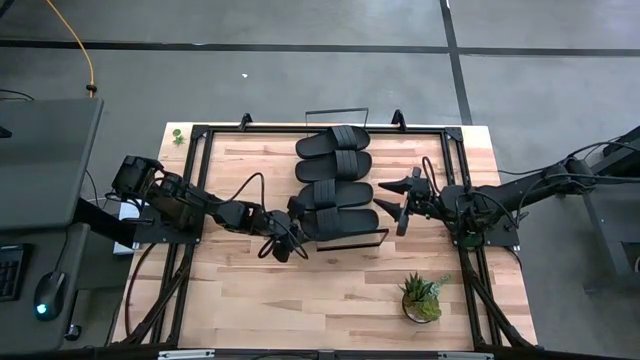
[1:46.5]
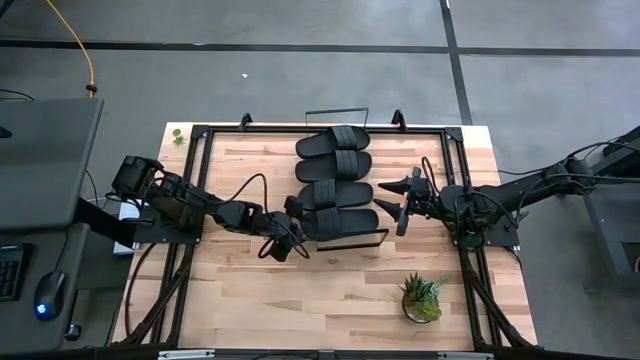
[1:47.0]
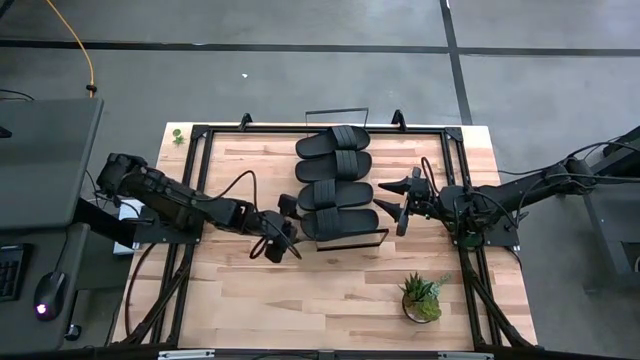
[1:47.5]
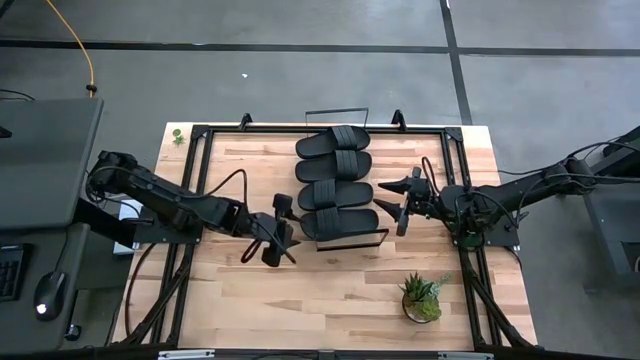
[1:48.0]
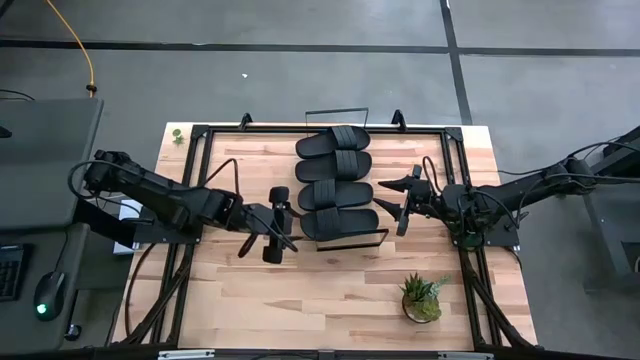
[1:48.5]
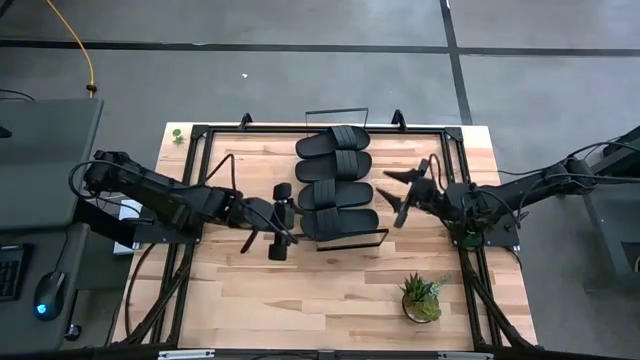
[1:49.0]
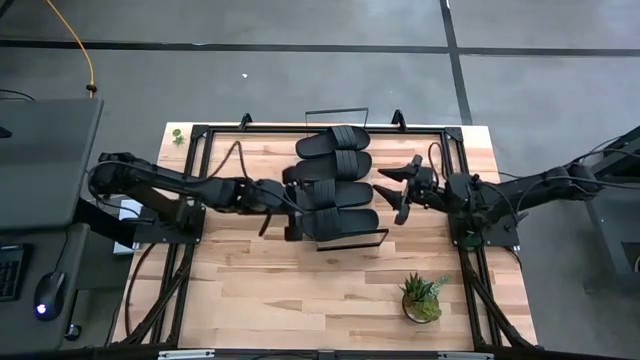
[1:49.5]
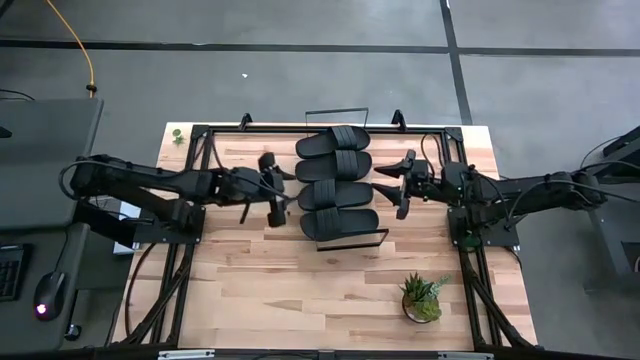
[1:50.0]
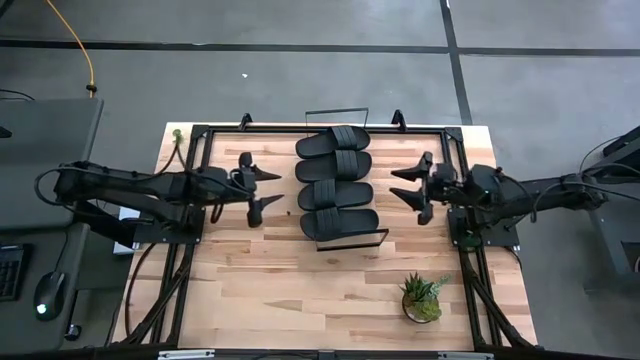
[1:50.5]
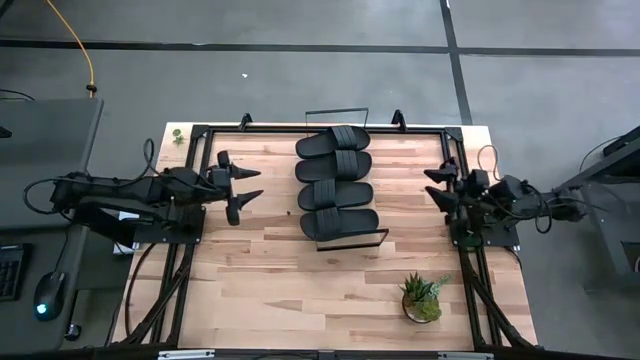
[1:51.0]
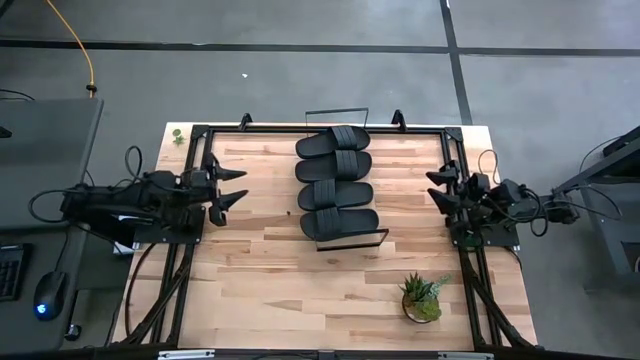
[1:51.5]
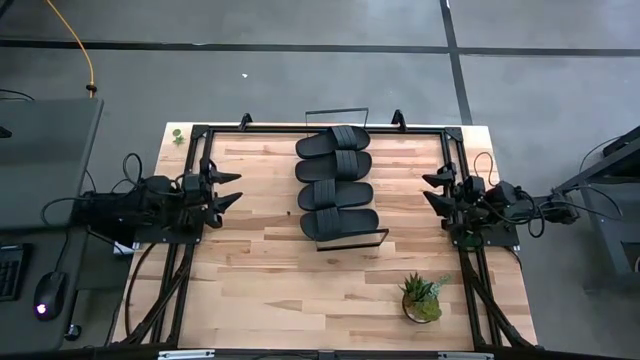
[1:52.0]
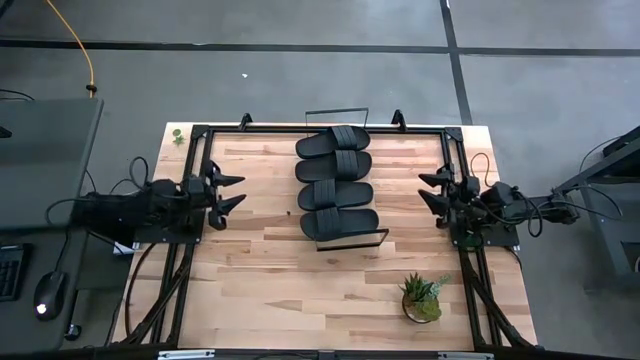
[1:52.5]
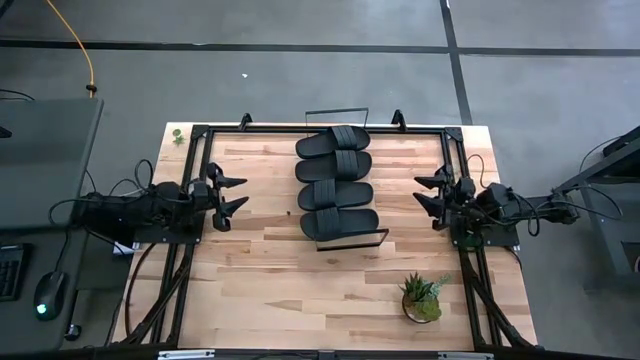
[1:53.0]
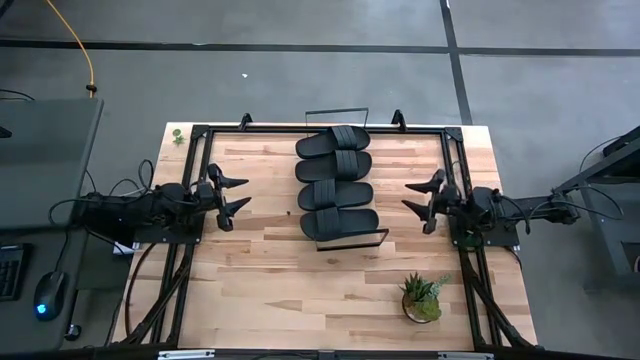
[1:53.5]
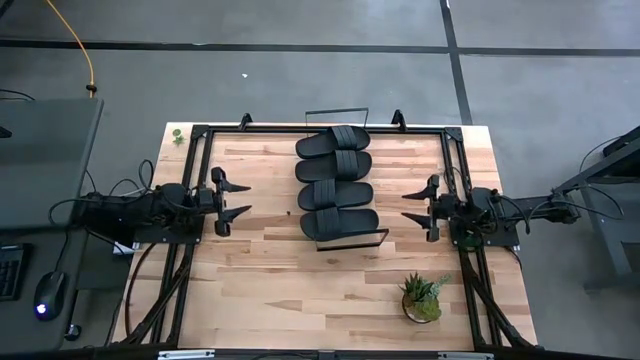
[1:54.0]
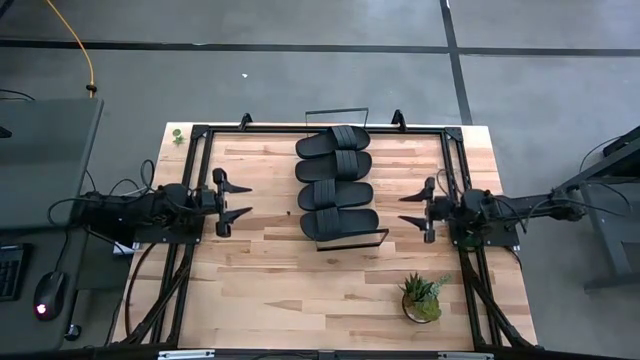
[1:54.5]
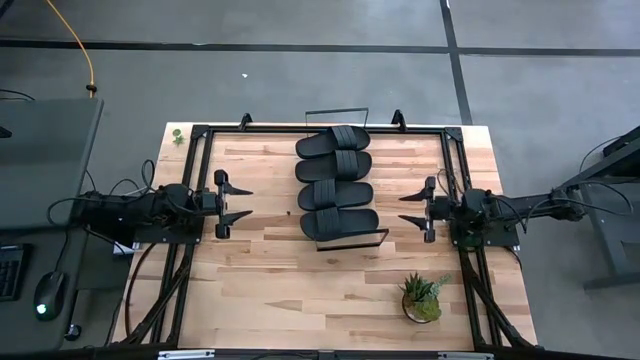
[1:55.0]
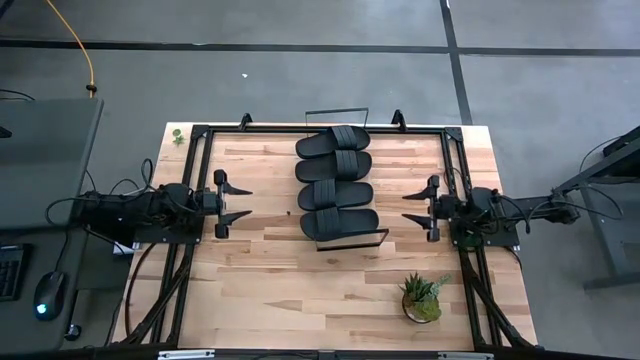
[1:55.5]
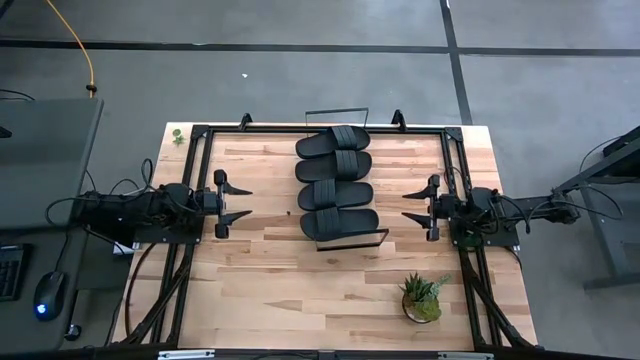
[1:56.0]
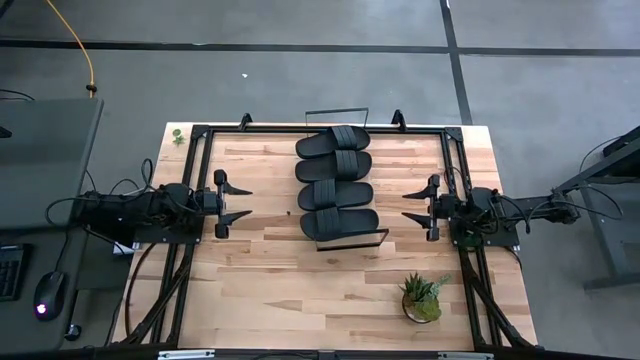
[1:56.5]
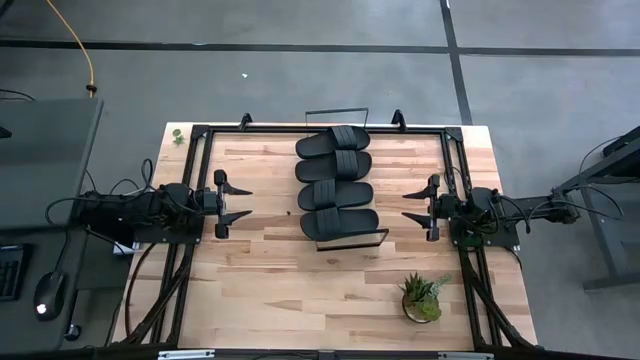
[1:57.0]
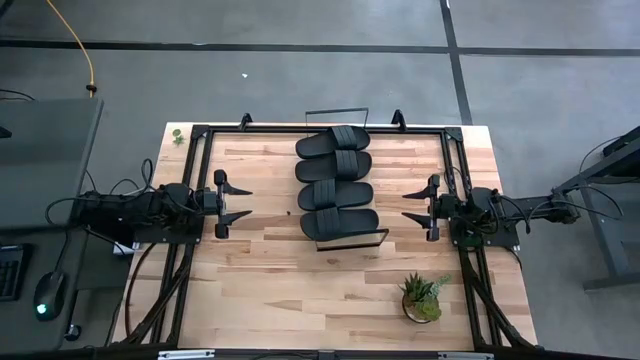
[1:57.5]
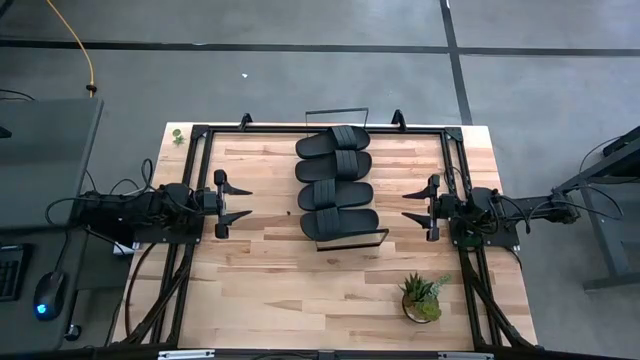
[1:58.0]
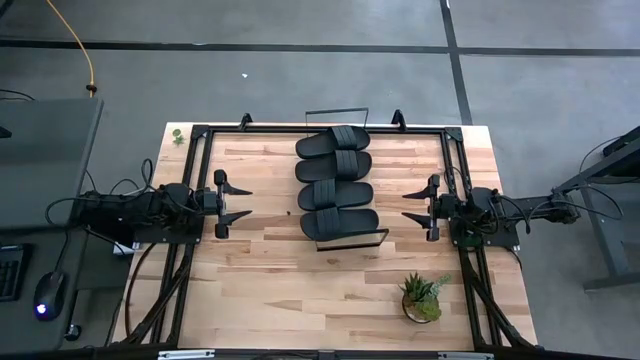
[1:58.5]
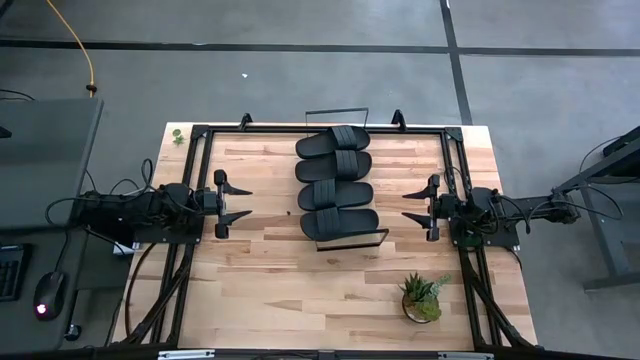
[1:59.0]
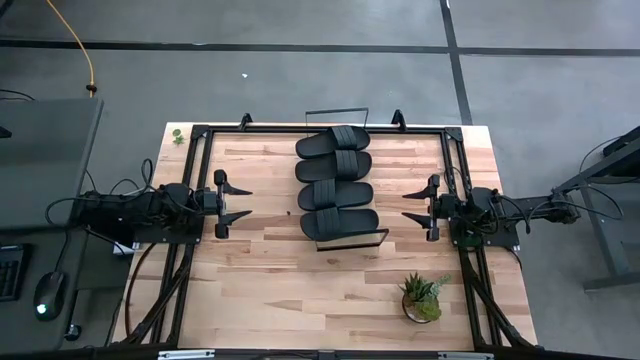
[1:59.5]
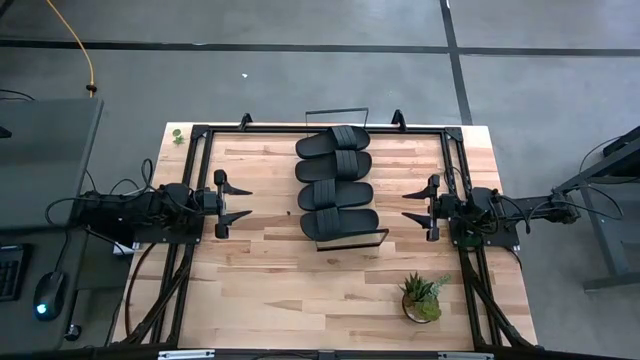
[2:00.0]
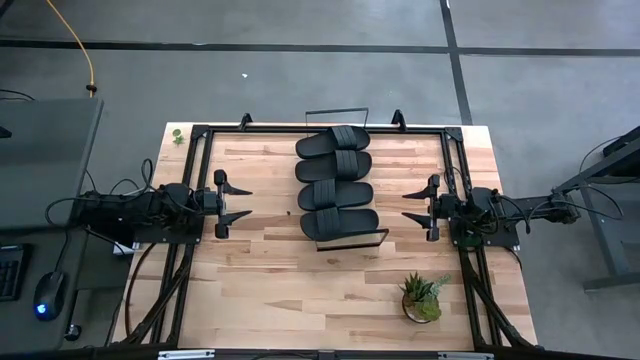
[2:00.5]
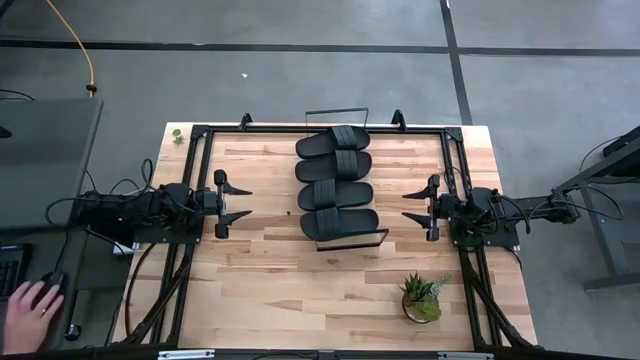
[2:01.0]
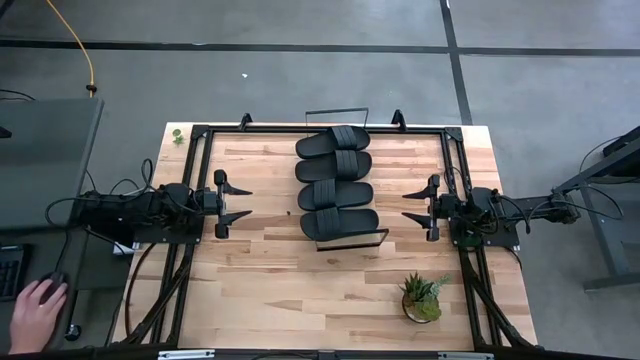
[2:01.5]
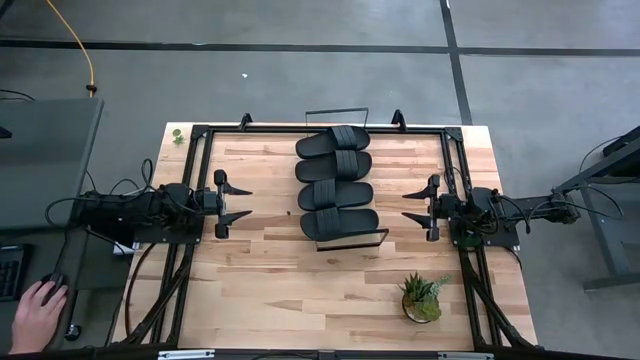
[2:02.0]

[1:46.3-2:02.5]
Task: Pick and place slides into the shelf
Return to Home Position

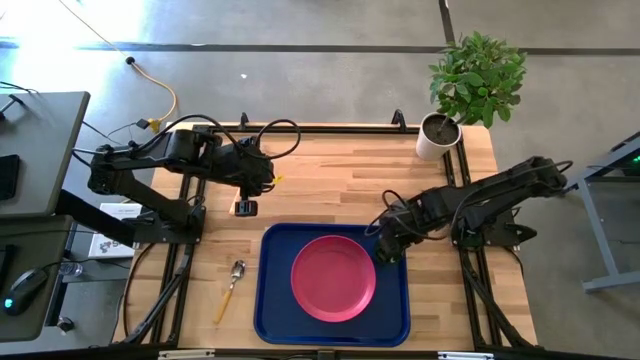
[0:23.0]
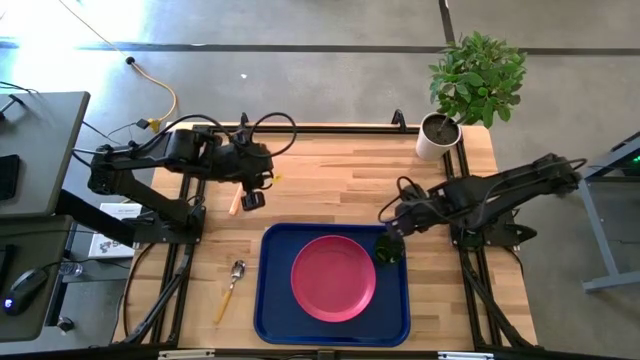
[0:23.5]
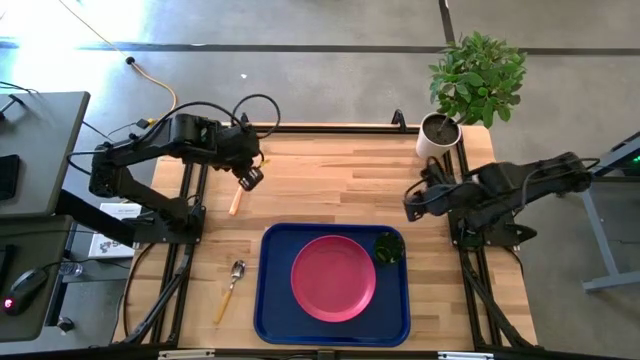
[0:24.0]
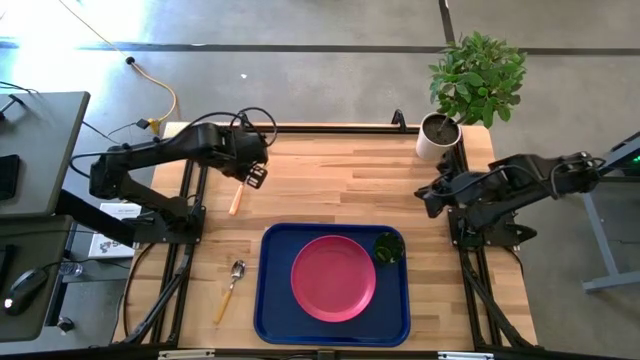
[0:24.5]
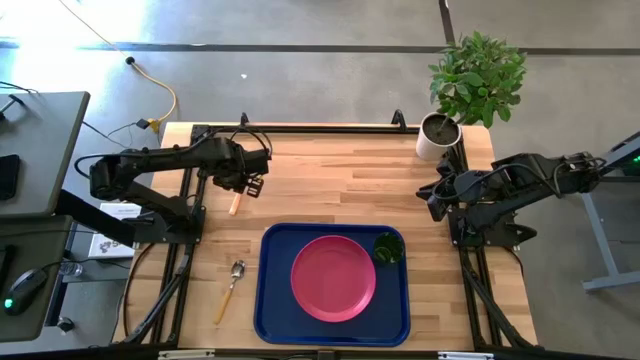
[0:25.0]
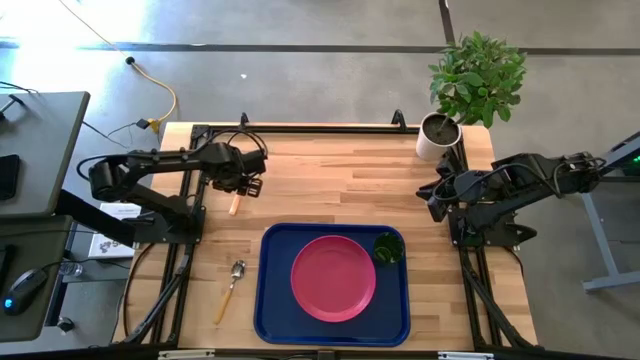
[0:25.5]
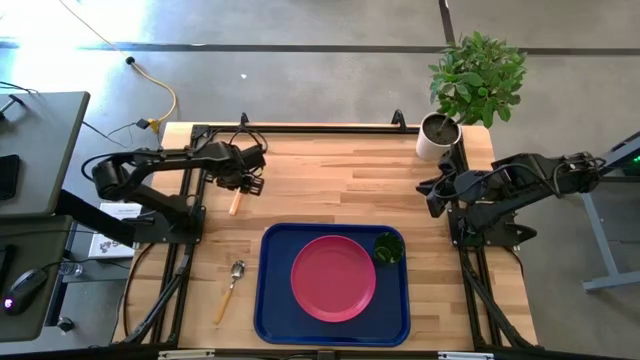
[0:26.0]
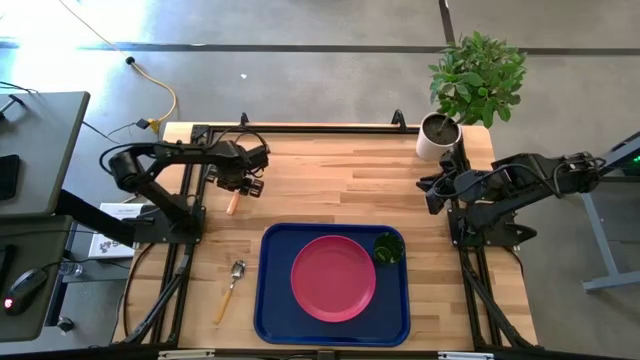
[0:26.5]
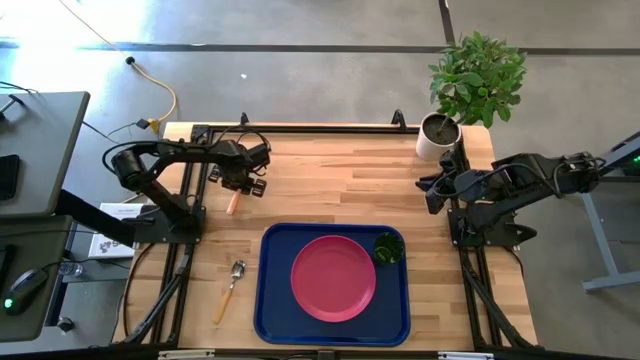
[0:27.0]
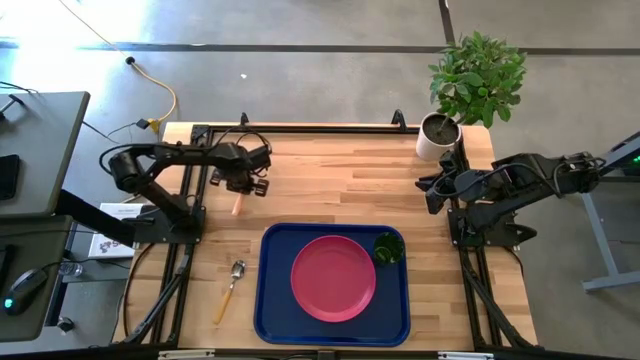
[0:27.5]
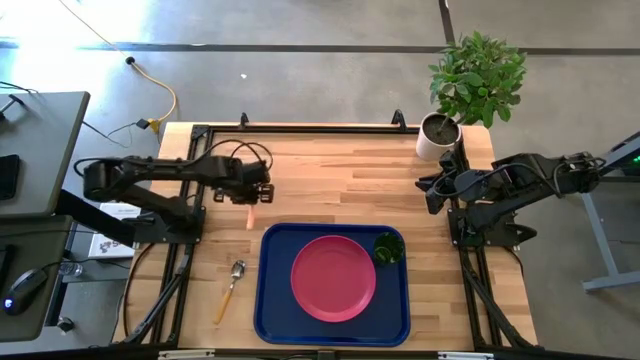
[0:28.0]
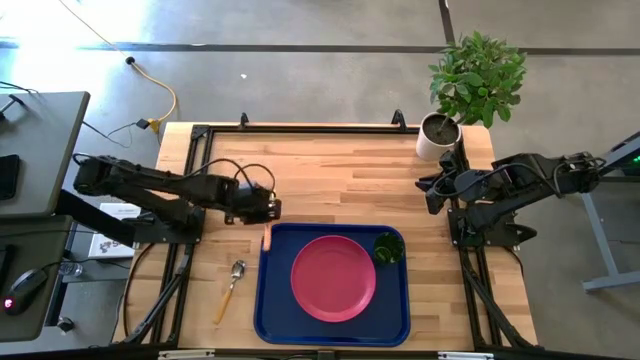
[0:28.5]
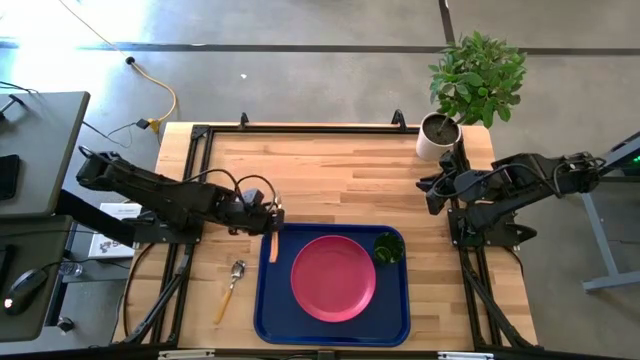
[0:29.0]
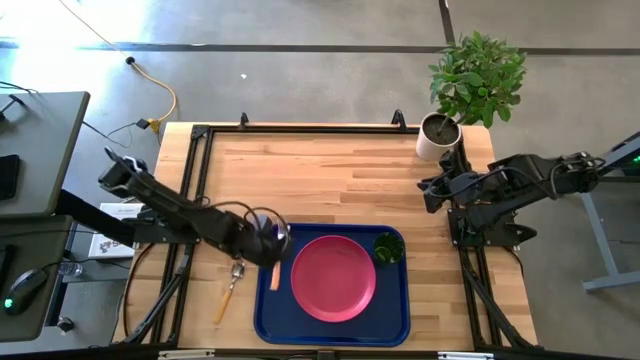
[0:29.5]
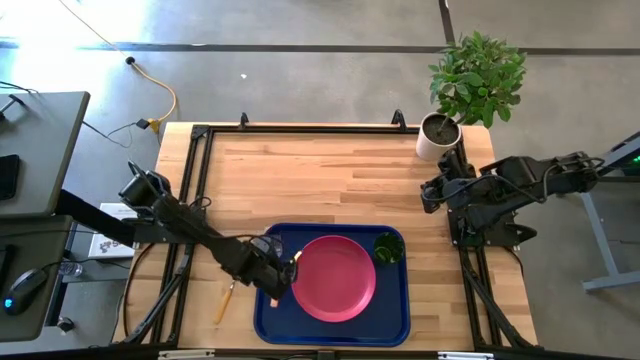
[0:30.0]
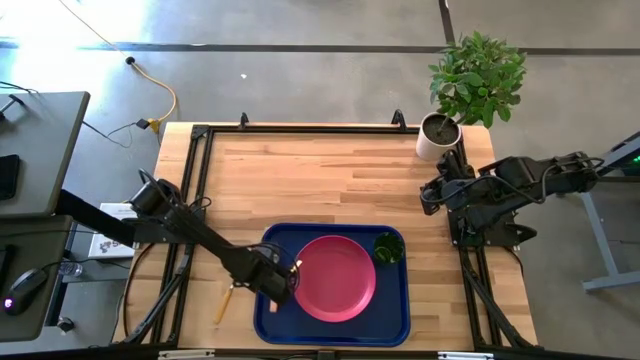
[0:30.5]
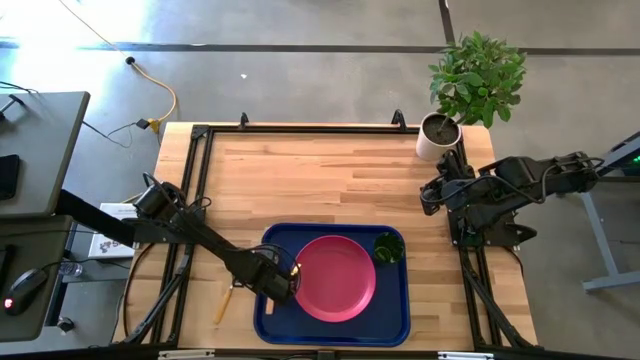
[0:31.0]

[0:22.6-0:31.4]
Task: Pick and place plate/cup/fork/spoon on tray
Put the orange fork on the blue tray to the left of the pink plate
